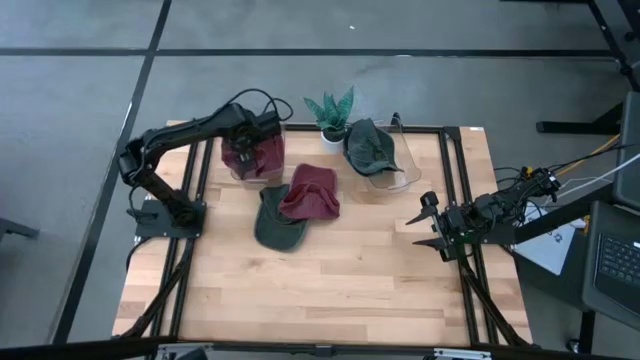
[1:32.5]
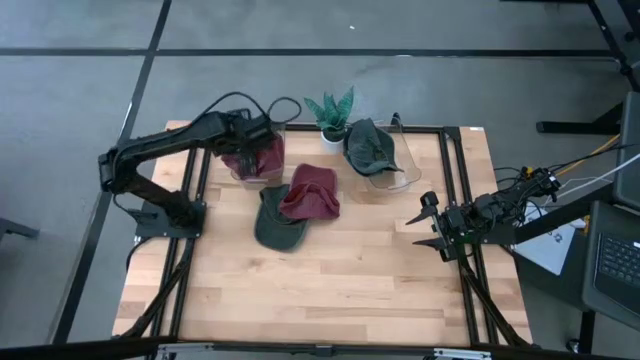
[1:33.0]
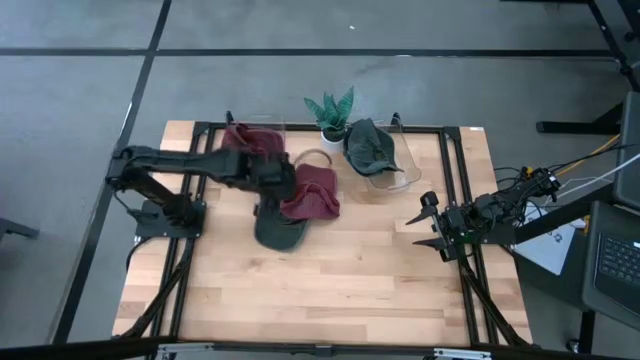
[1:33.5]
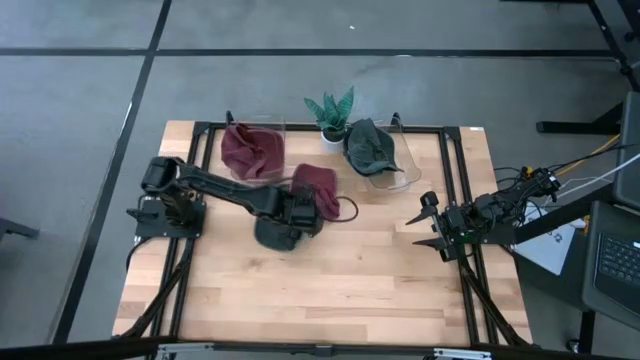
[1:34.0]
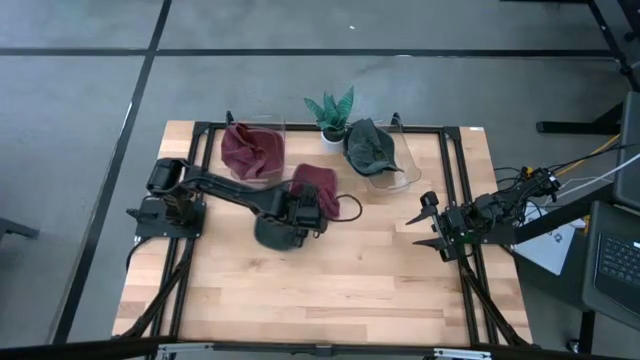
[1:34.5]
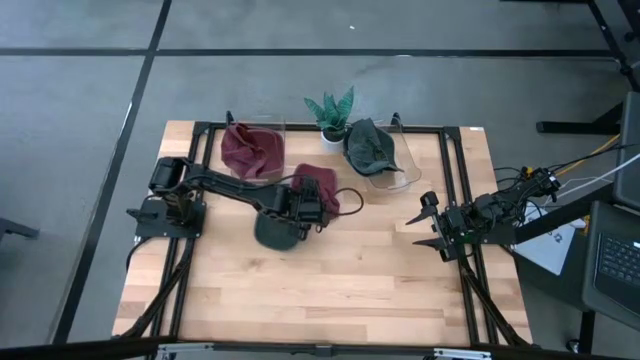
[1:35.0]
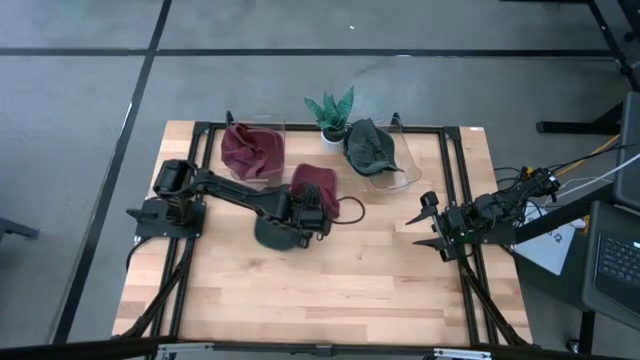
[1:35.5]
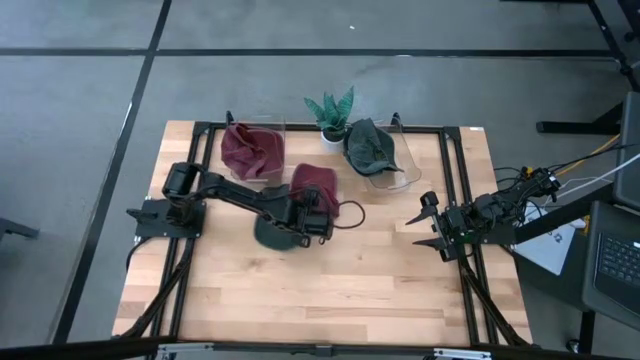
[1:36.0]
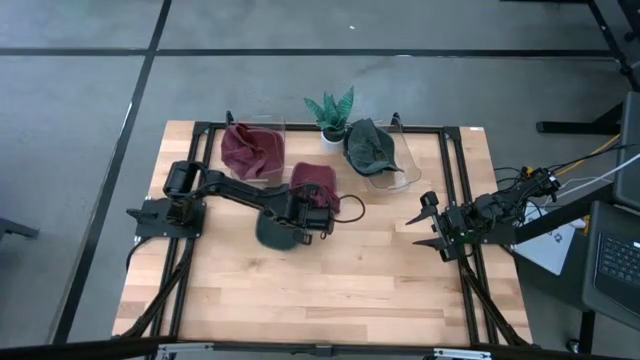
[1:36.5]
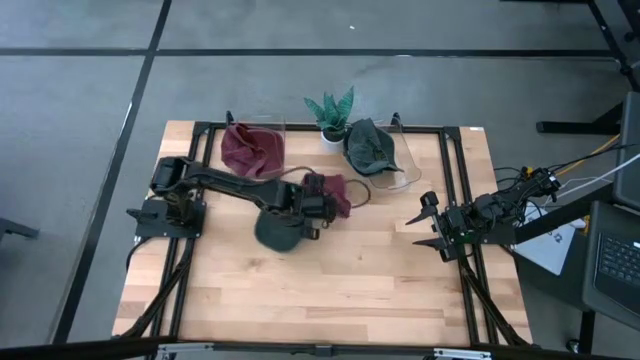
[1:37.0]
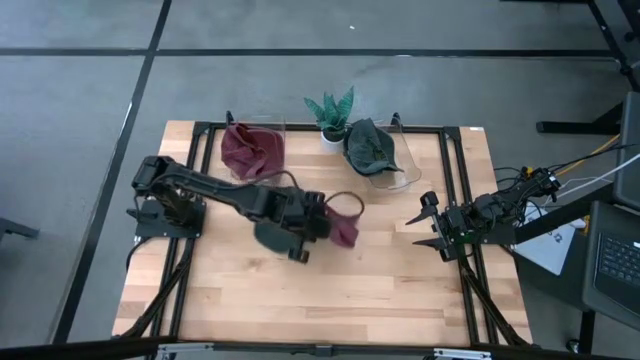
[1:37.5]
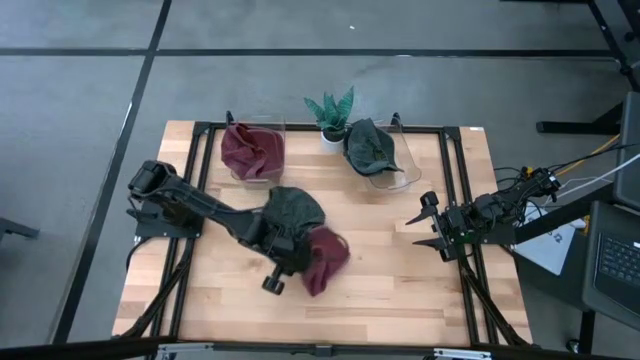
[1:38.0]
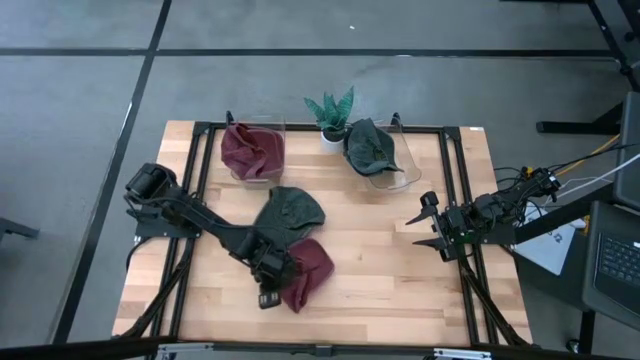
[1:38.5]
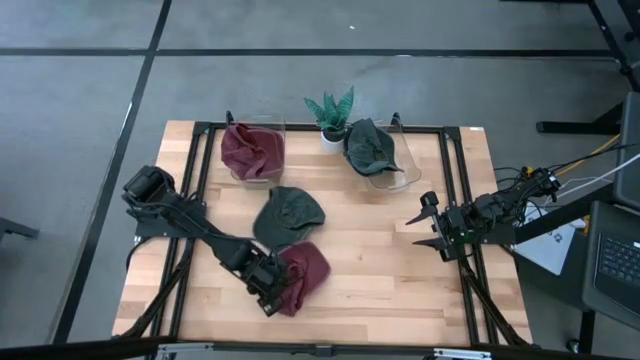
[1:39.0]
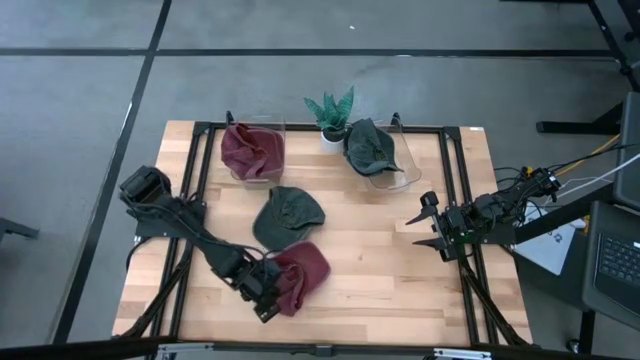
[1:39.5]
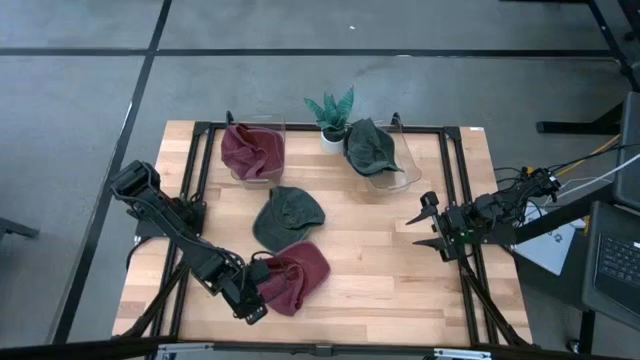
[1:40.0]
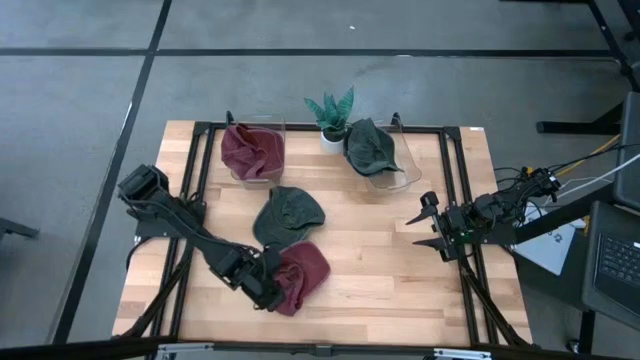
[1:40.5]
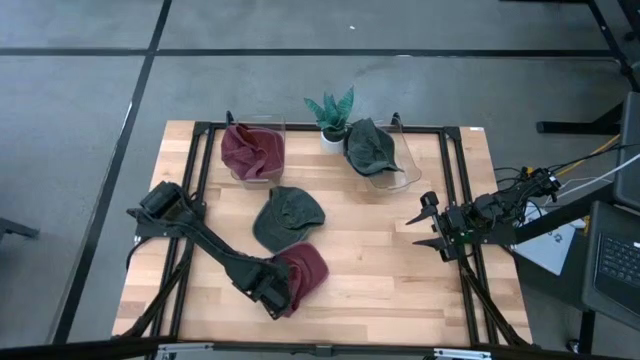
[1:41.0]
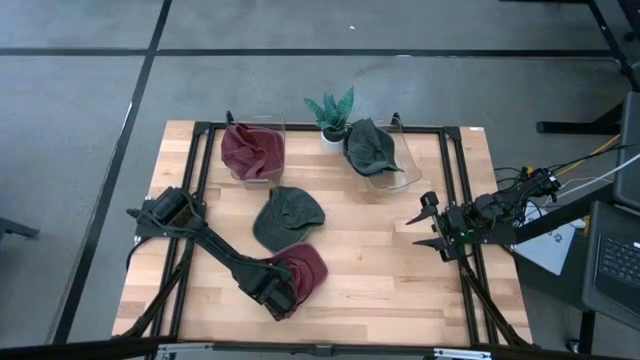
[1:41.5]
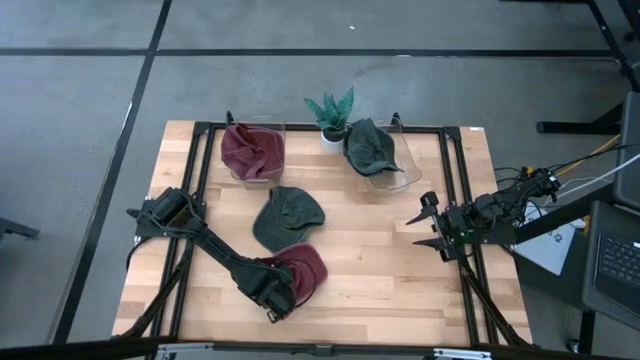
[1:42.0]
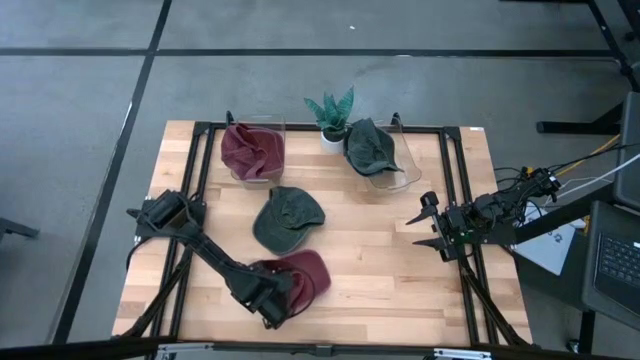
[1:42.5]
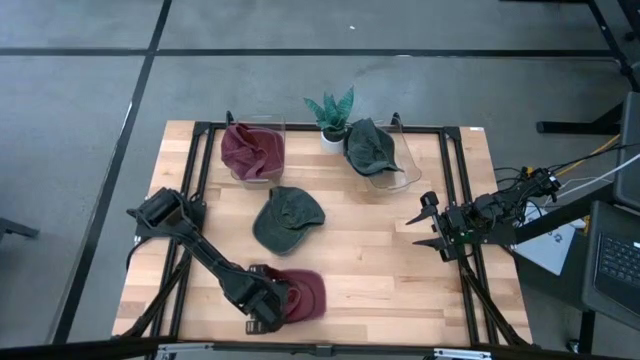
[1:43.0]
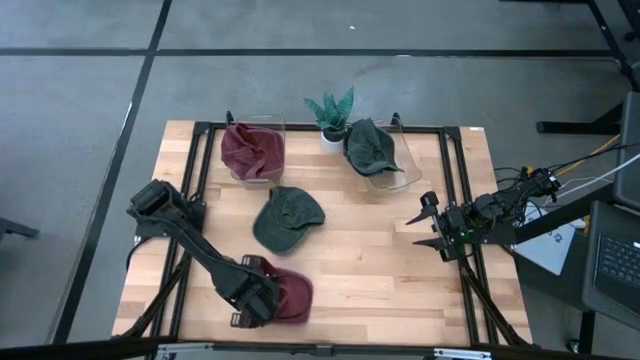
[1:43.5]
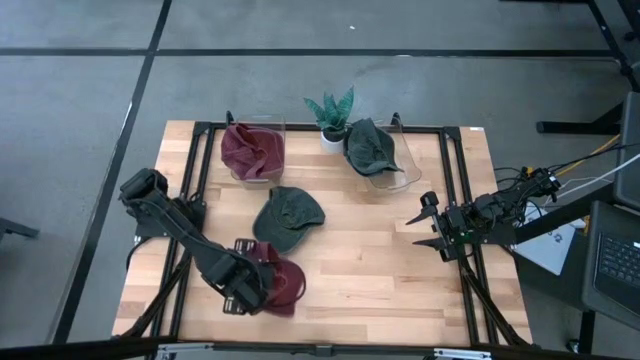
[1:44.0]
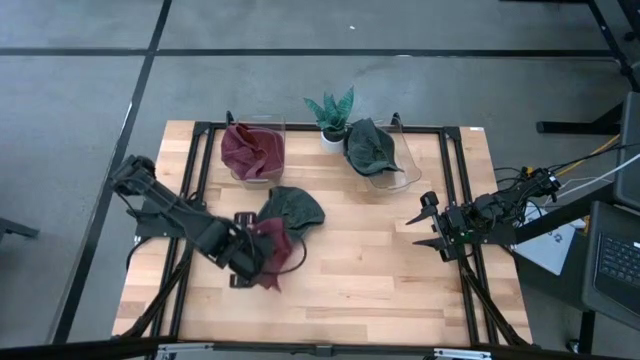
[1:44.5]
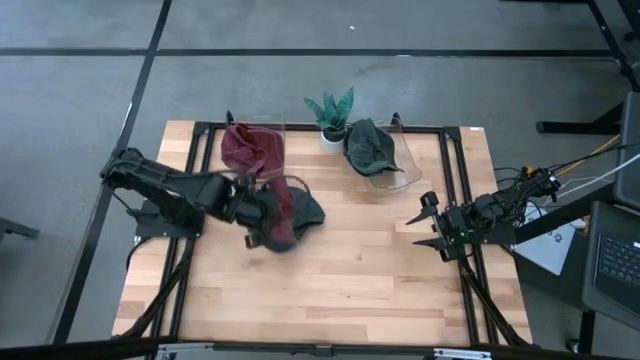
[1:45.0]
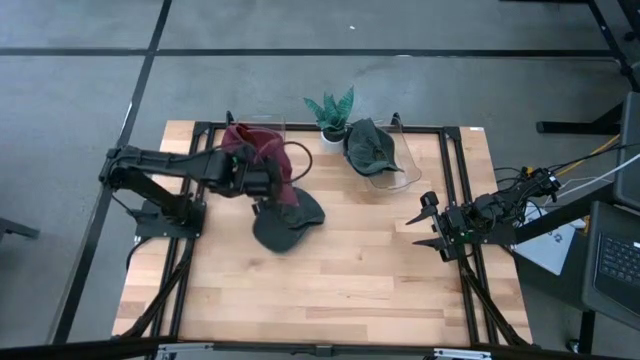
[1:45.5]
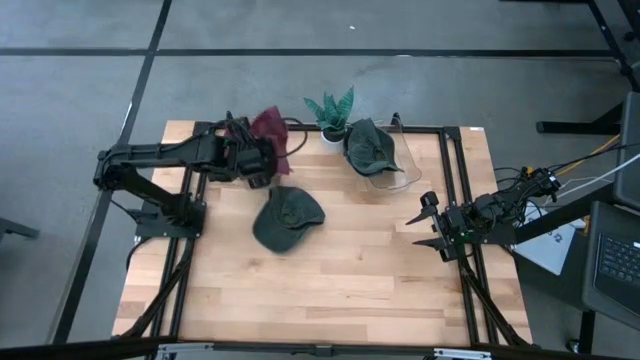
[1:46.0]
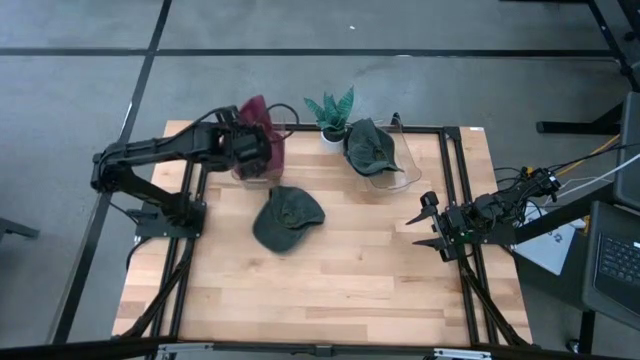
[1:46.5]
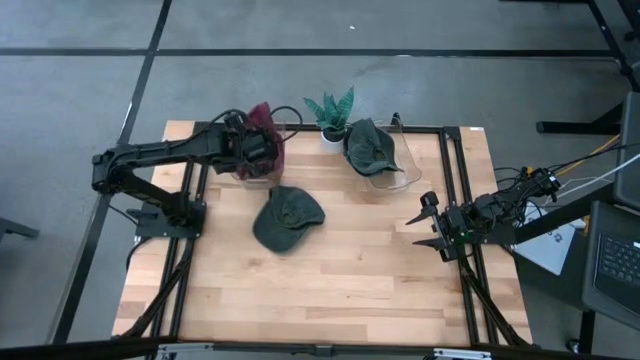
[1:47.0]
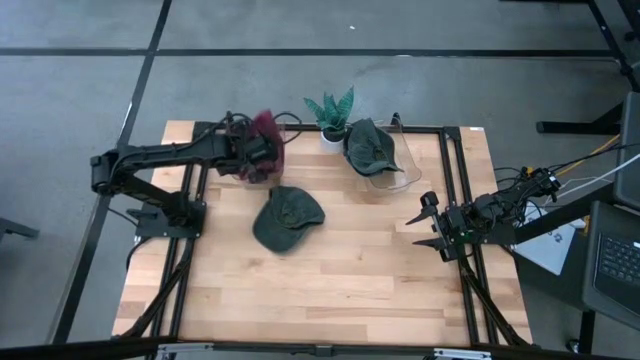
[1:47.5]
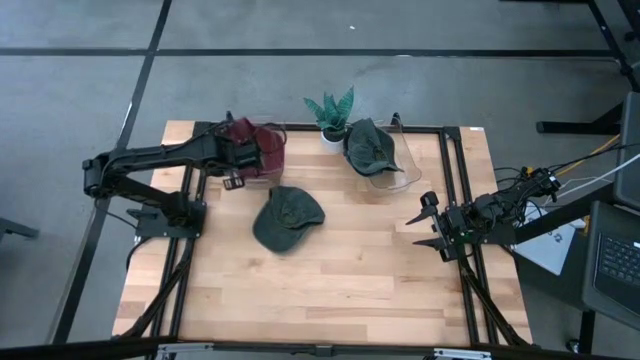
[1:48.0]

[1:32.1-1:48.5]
Task: Pick & Place hat
Put the red cap into the left bin
